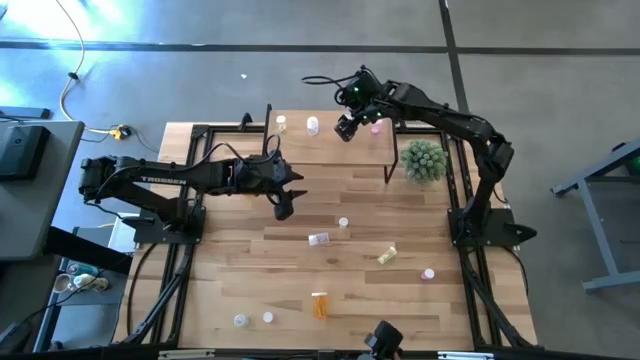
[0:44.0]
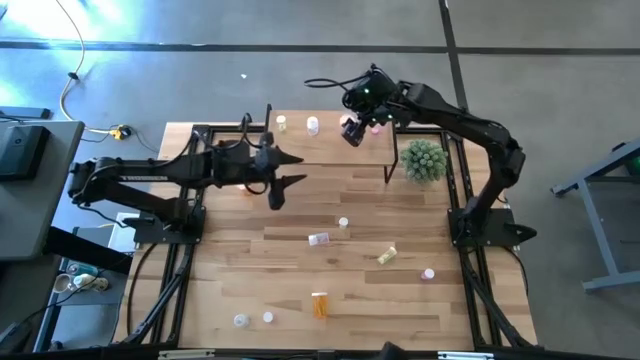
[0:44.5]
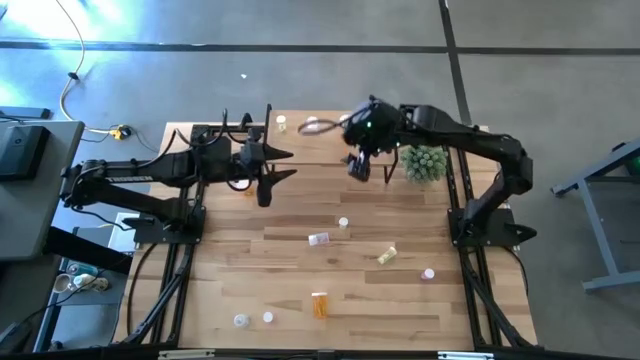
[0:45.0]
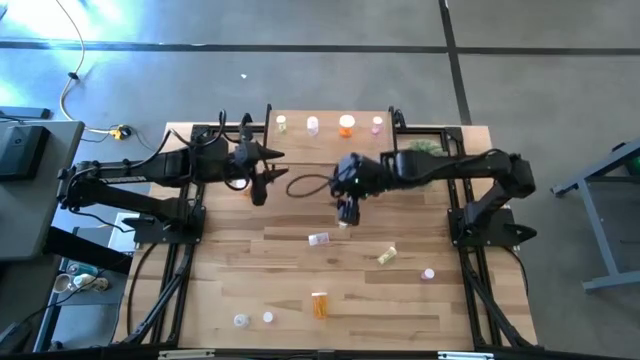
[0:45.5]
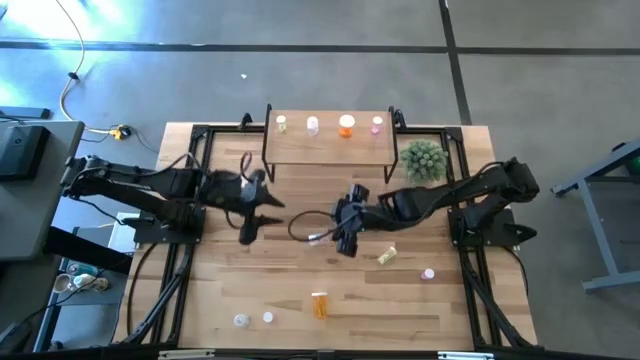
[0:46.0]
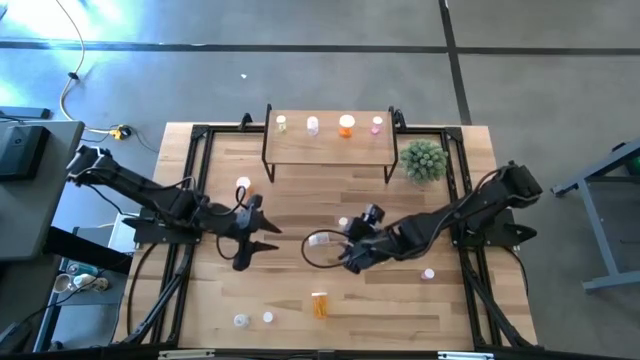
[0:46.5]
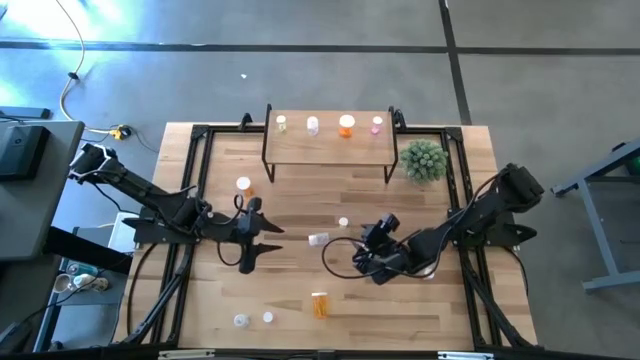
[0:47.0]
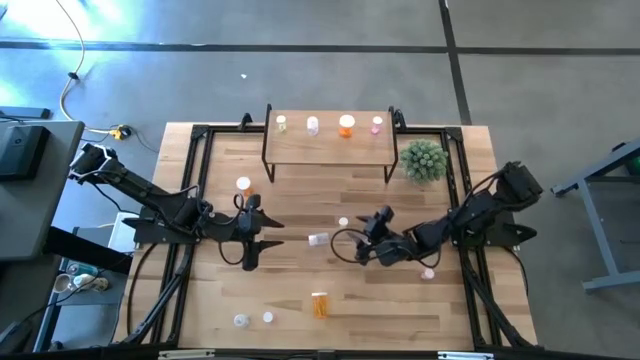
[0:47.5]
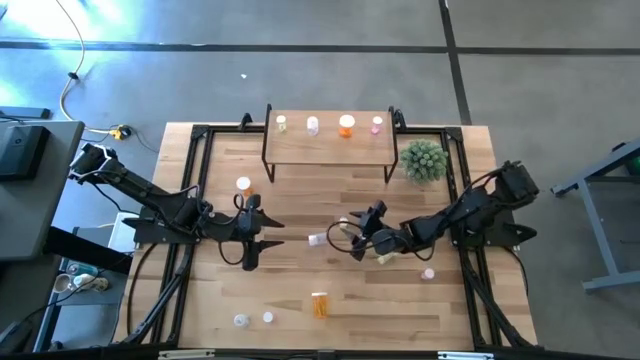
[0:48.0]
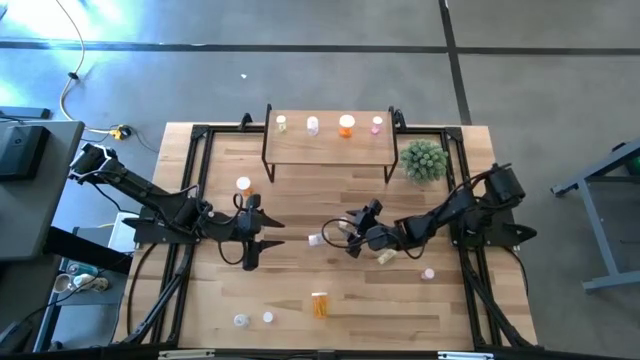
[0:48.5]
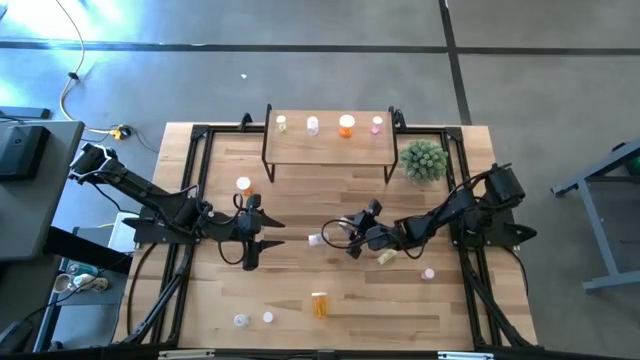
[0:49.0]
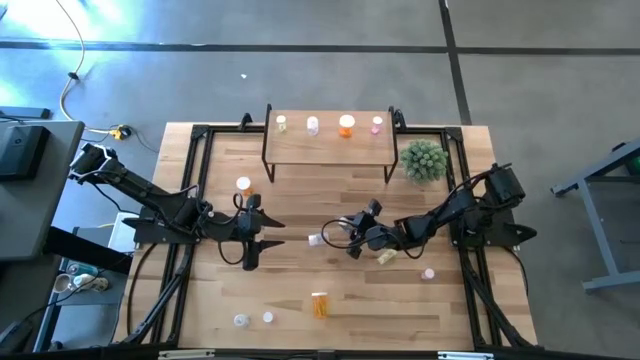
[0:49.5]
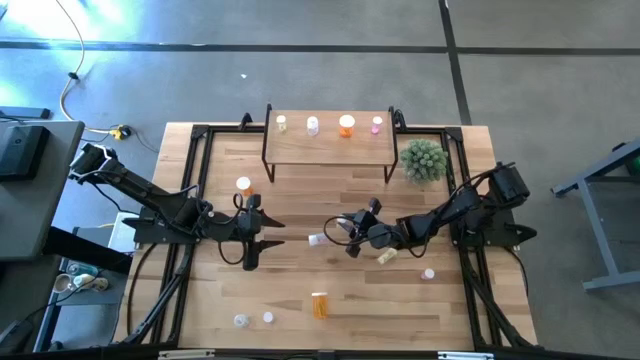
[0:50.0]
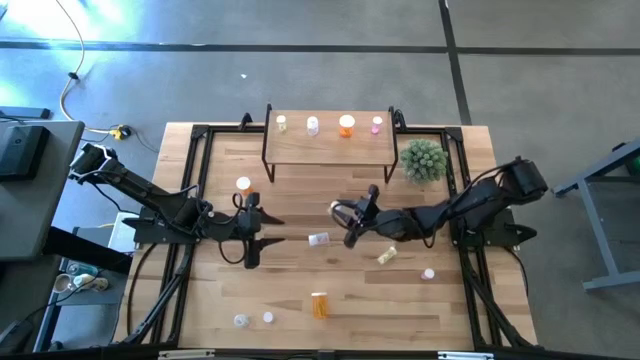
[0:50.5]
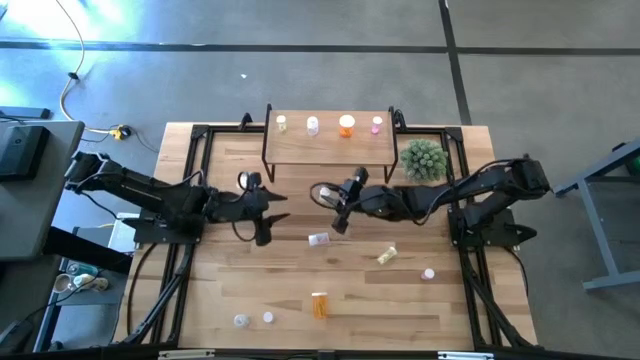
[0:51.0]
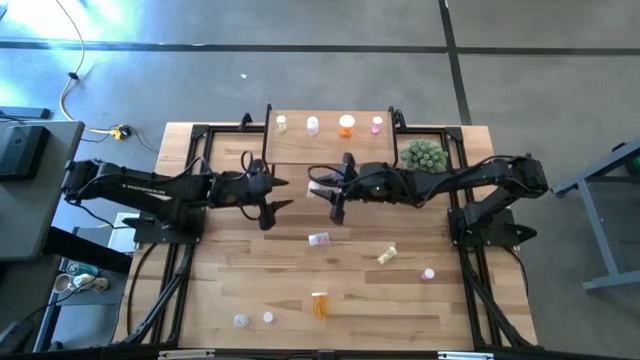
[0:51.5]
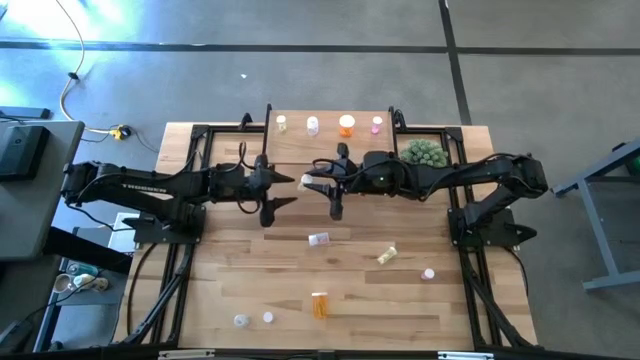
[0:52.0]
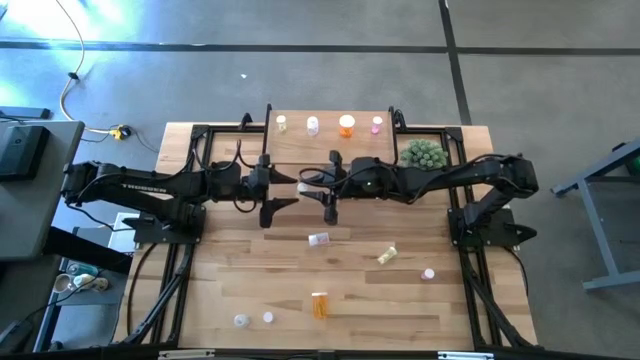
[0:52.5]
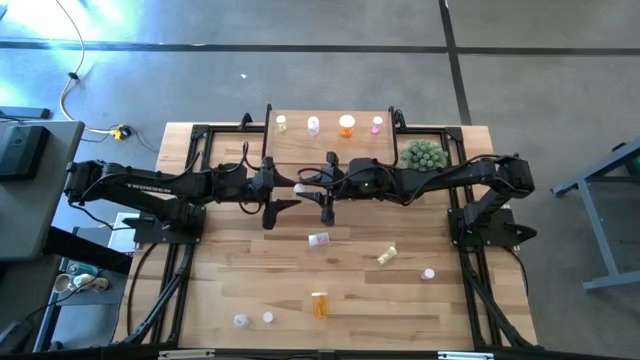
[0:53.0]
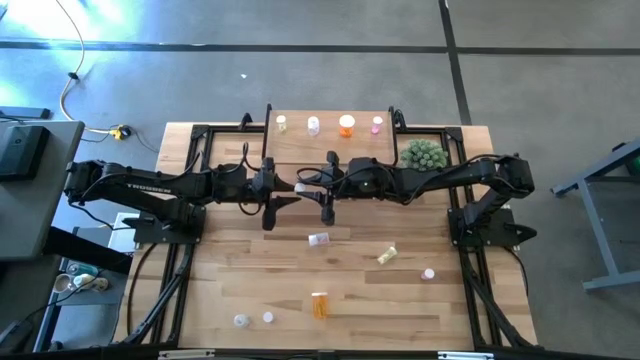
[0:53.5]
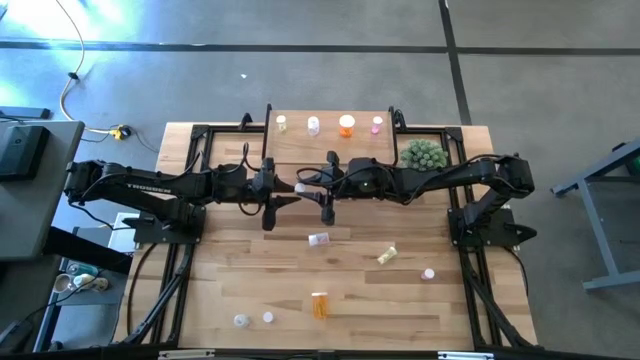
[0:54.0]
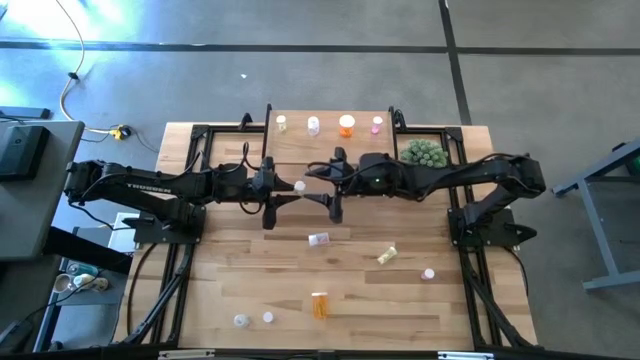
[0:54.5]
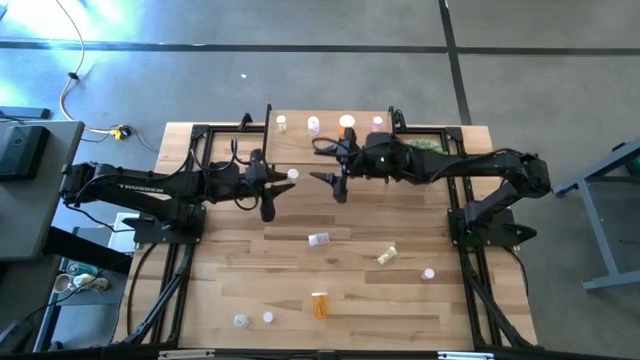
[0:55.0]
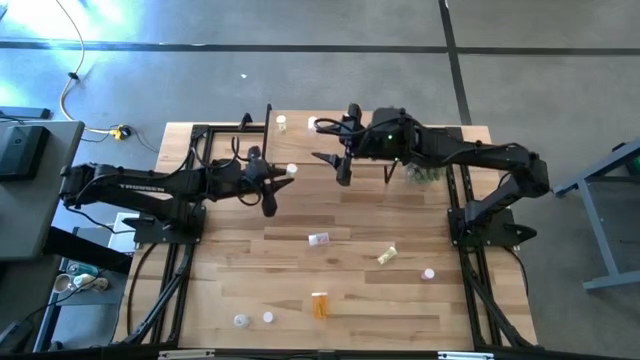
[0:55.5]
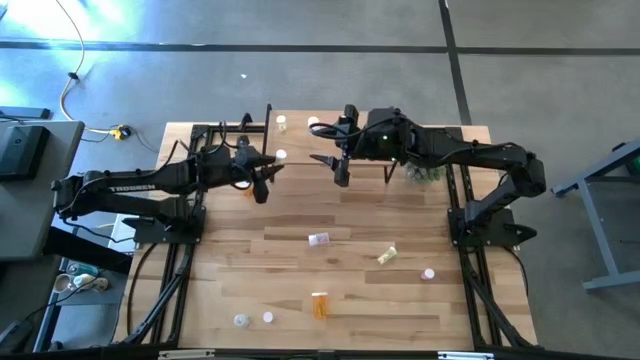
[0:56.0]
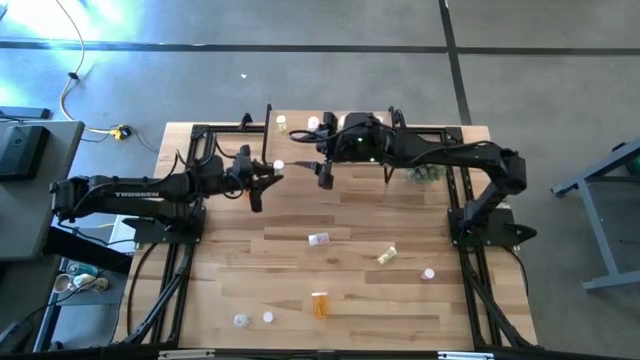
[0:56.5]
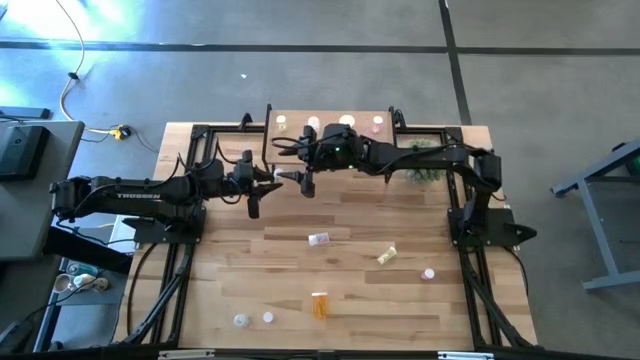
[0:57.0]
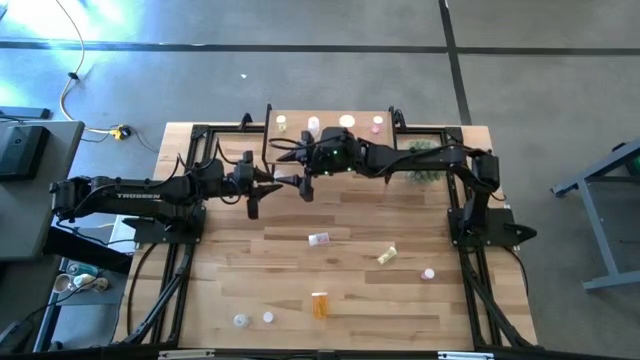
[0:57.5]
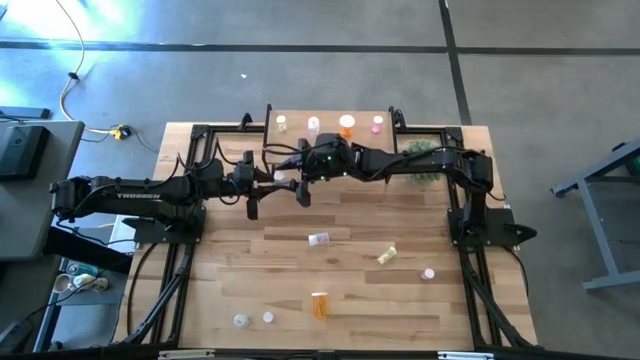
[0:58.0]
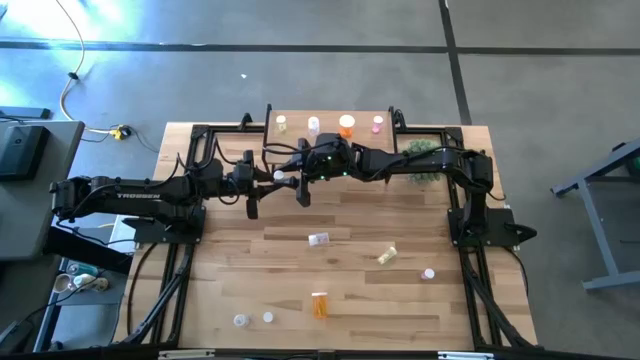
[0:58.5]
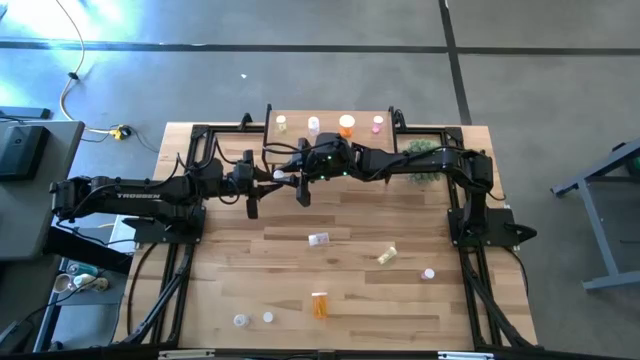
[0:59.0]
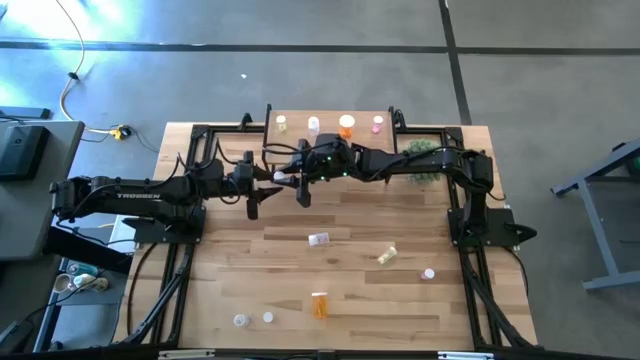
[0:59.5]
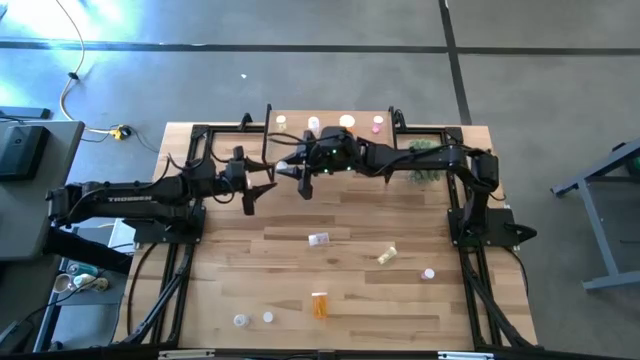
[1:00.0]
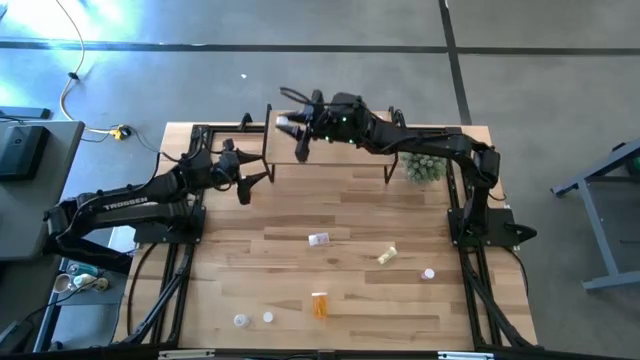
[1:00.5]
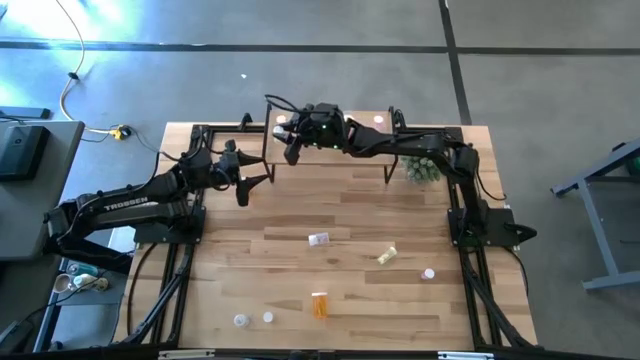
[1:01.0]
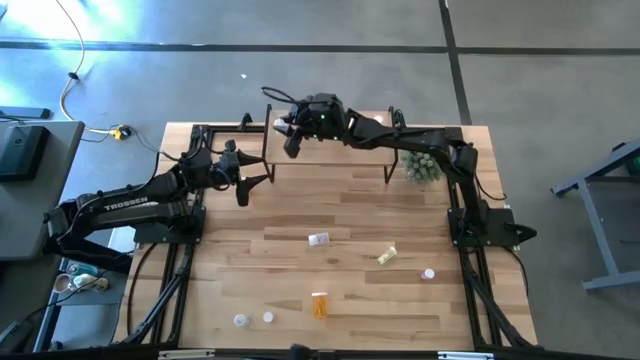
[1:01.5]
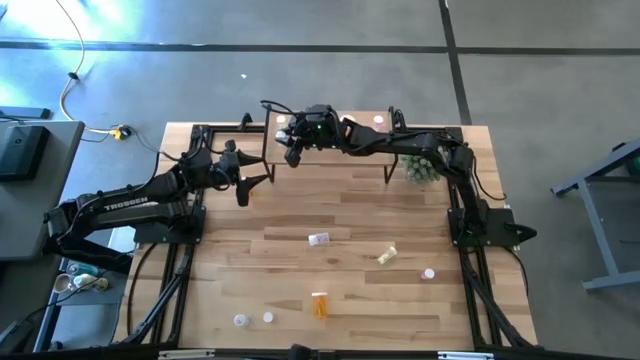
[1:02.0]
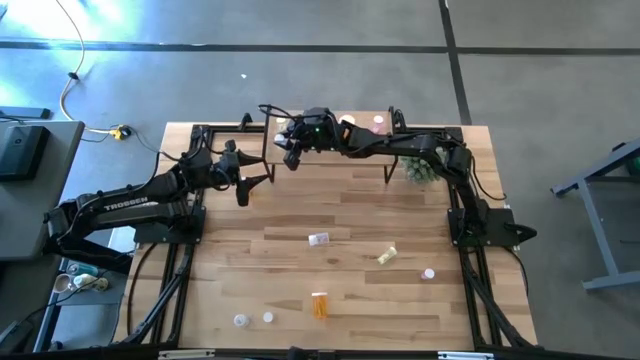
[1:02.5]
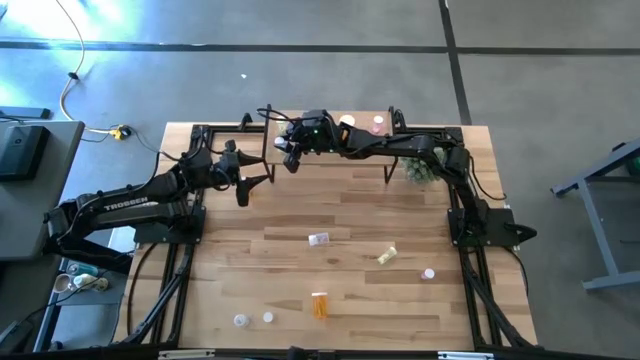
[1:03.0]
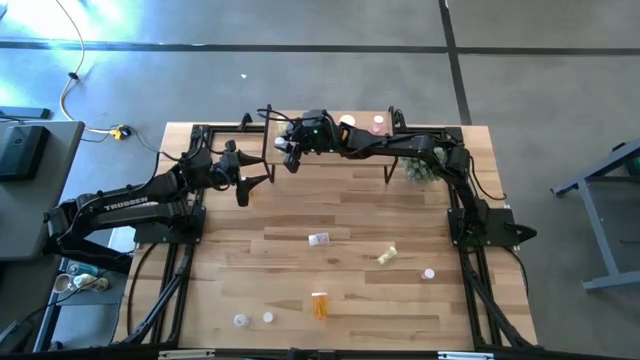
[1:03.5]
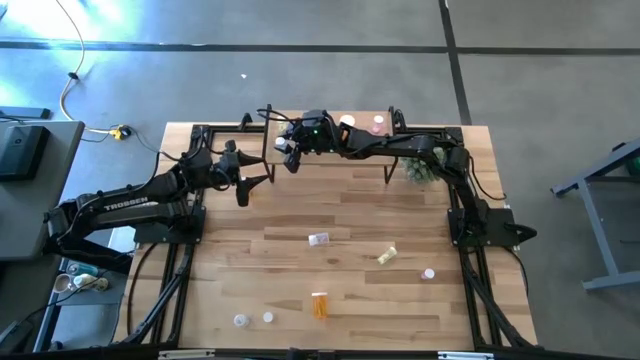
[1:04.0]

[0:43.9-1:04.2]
Task: Pick and place medicine bottles onto shelf by color
Put the top yellow pill bottle aligned with the other yellow pill bottle on the shelf

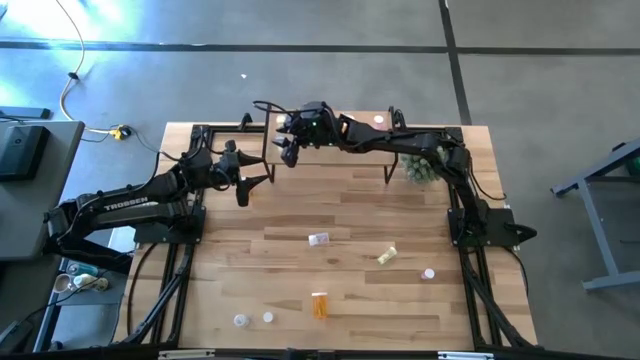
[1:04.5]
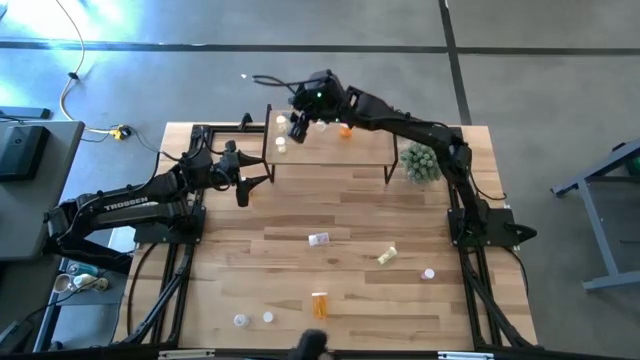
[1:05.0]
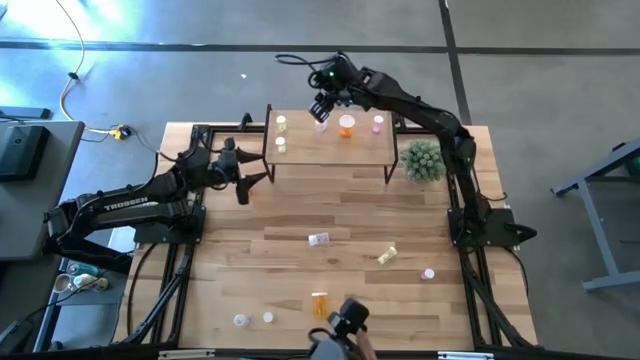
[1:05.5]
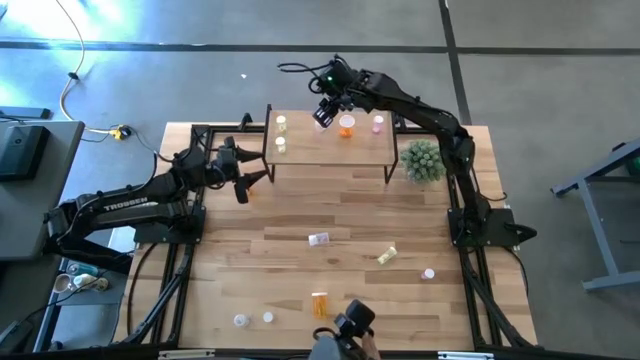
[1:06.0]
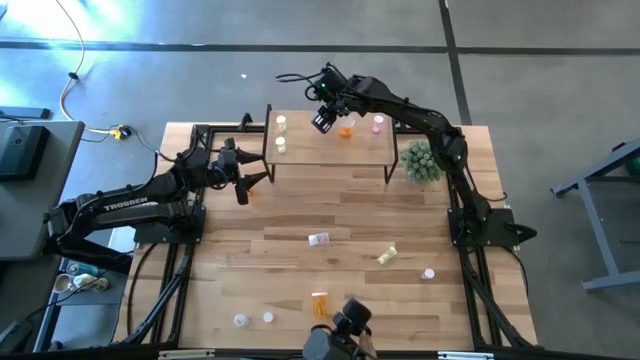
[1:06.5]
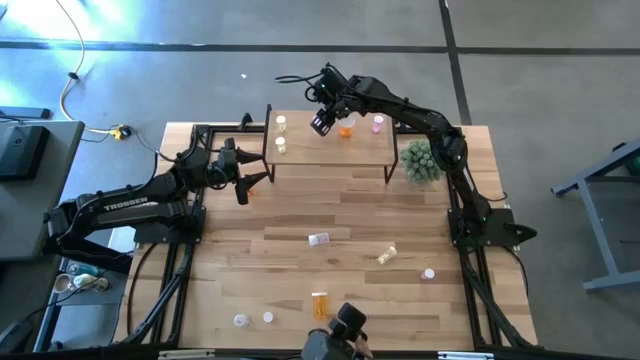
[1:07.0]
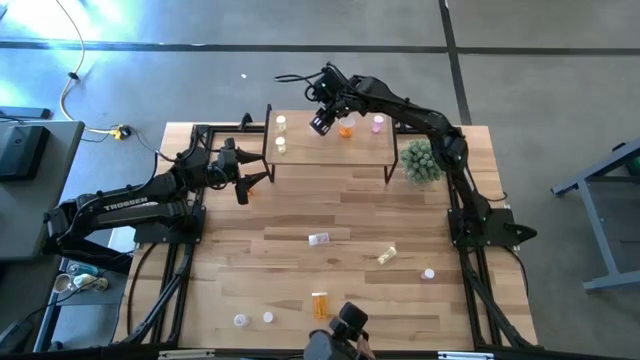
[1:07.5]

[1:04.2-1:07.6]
Adjust the transparent pill bottle on the shelf
